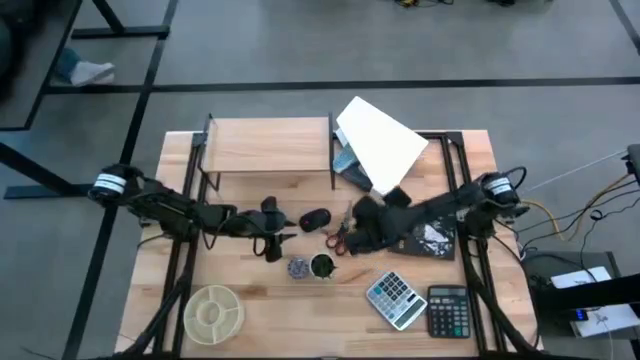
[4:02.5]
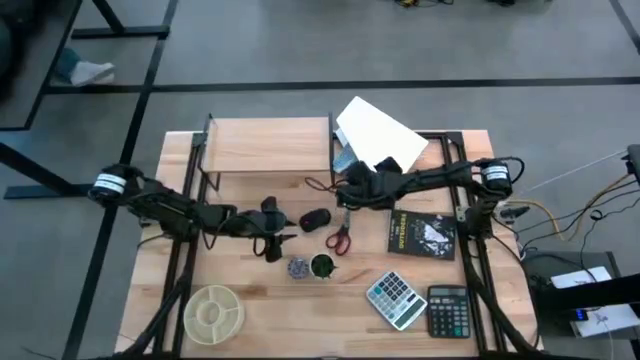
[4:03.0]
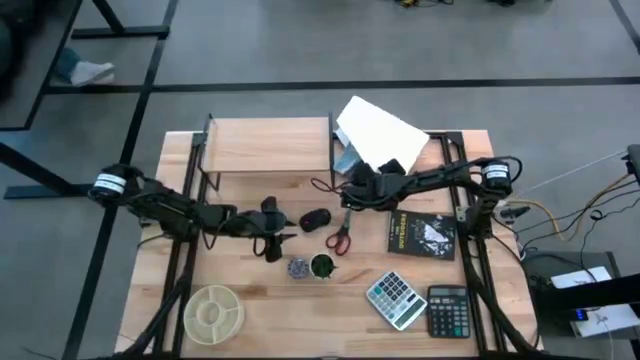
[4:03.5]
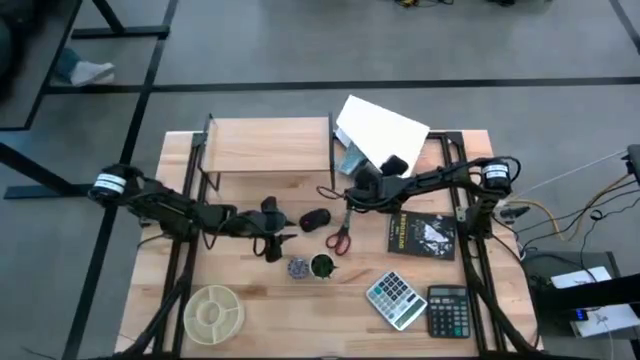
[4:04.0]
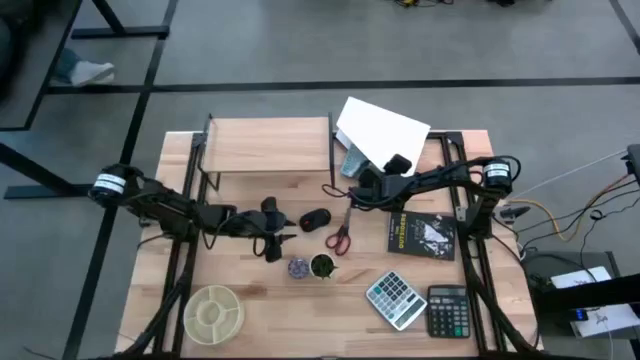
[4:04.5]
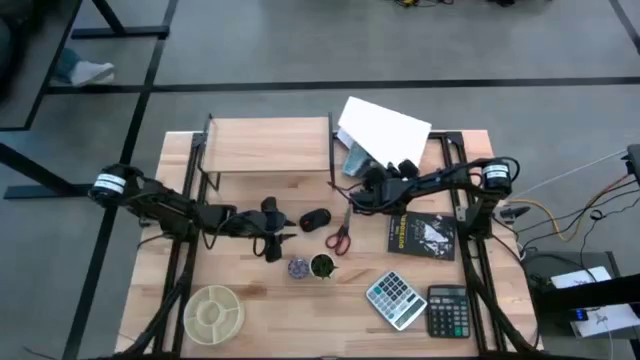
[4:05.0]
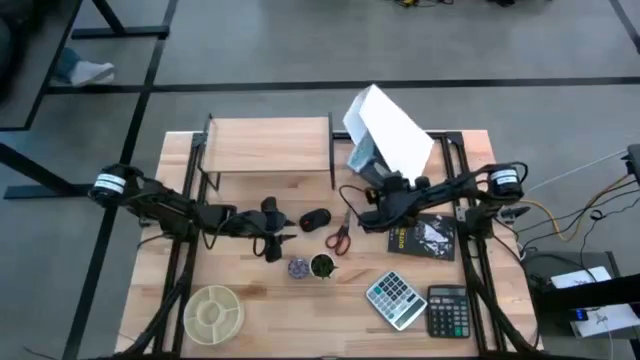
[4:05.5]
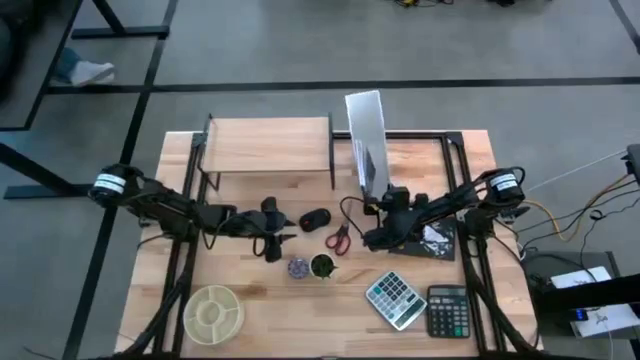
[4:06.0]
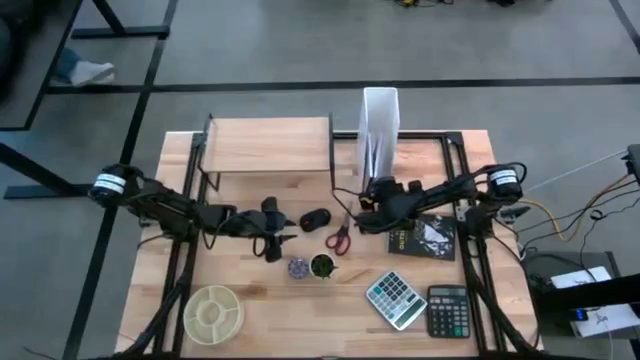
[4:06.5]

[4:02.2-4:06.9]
Task: Stock shelves
Adjust the white file holder

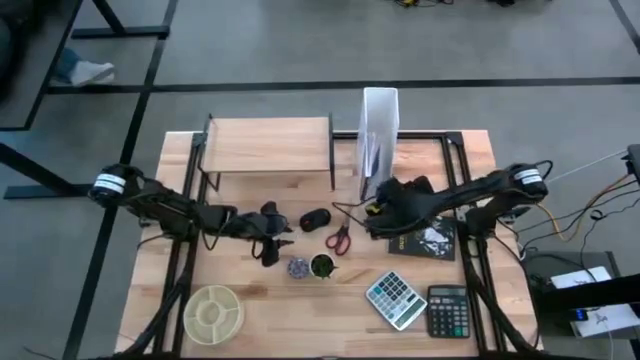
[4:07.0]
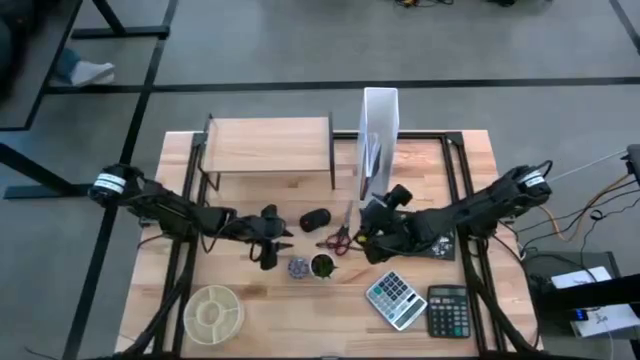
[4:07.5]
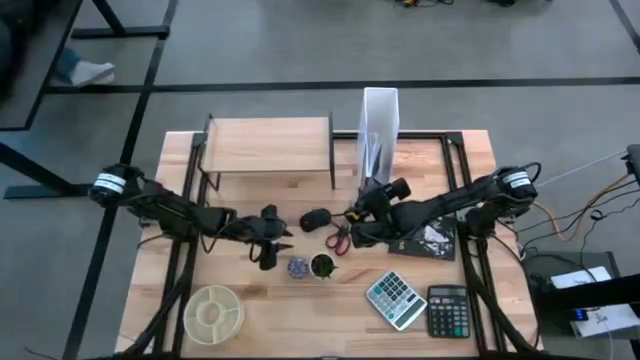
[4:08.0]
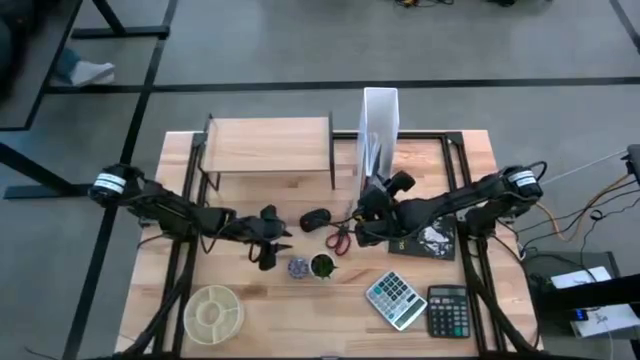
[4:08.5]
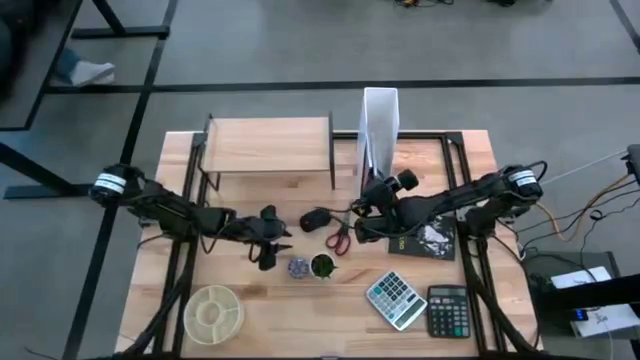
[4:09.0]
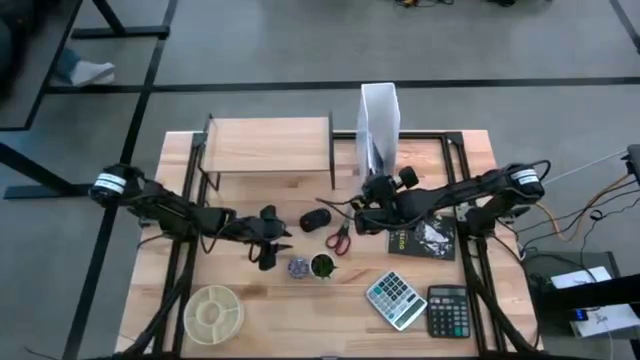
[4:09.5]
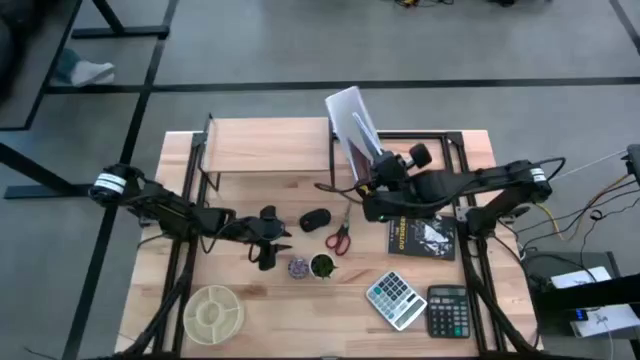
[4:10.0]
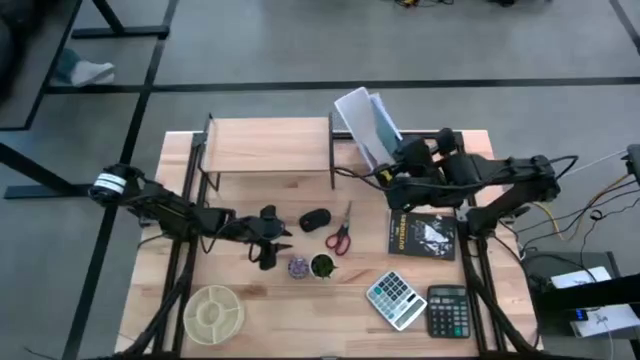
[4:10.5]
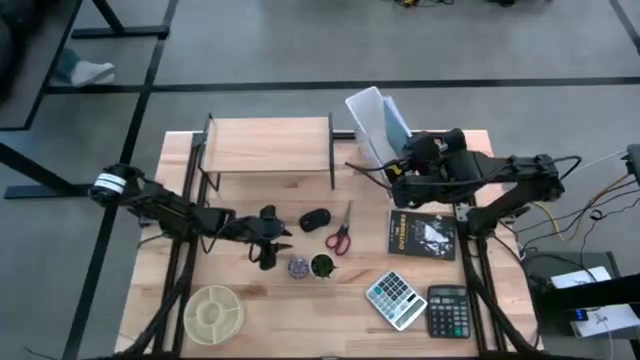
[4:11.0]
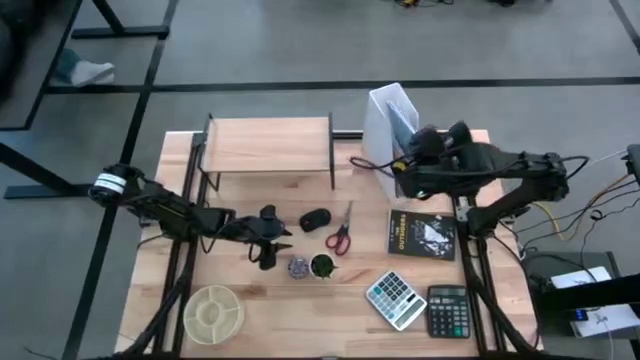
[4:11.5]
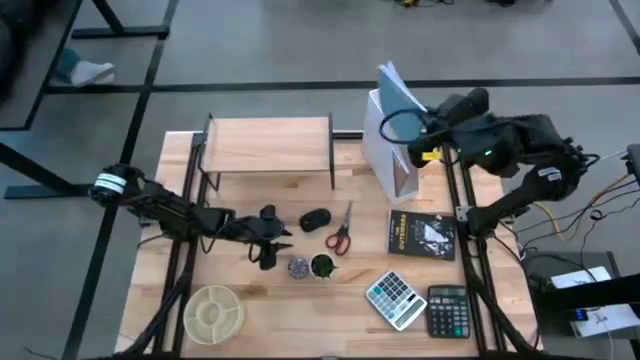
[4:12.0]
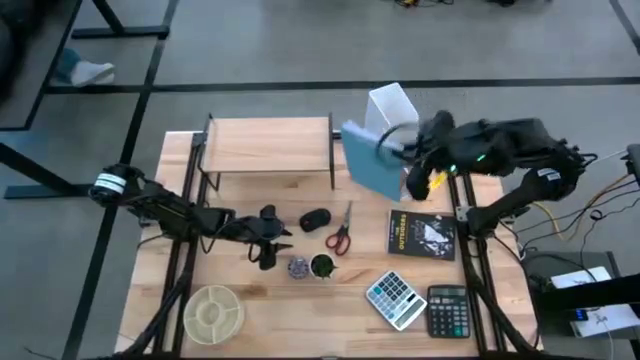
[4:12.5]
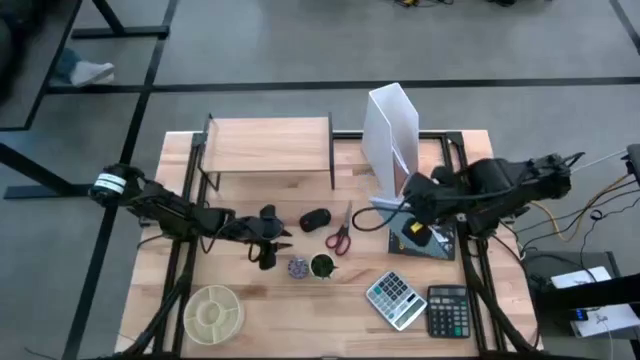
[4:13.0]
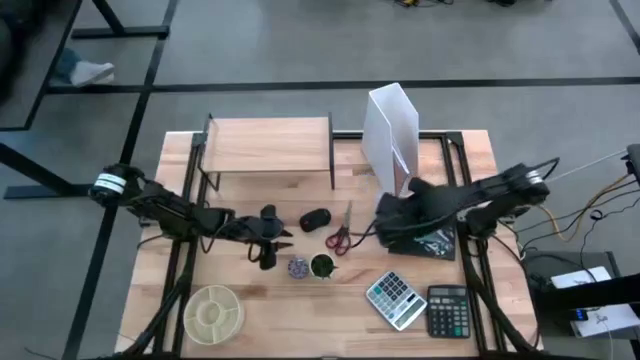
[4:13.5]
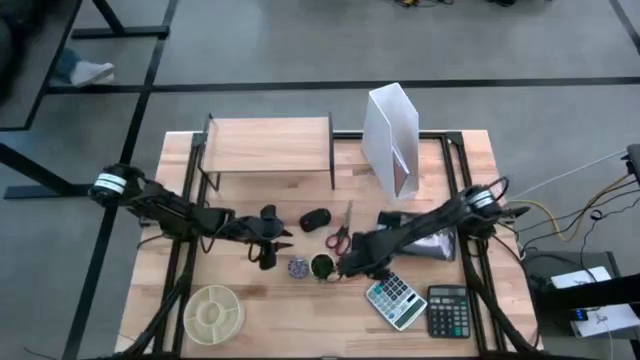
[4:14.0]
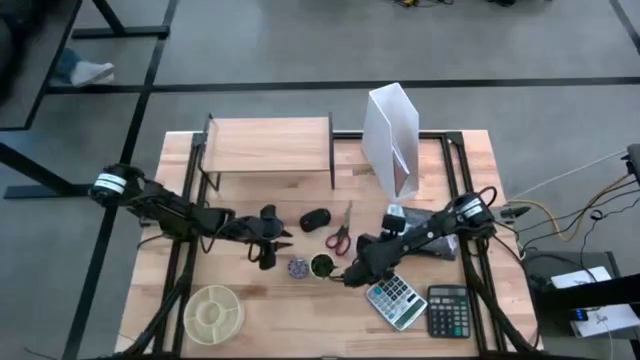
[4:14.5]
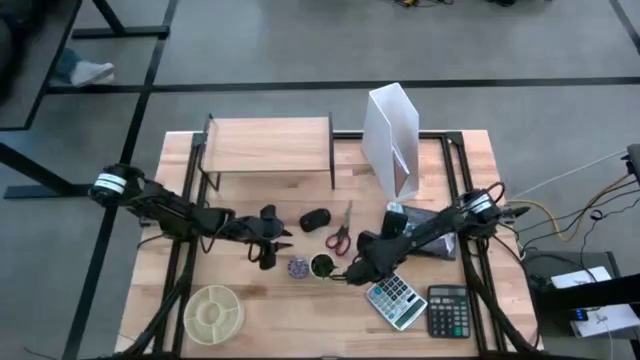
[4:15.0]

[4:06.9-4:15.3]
Remove the blue book from the white file holder

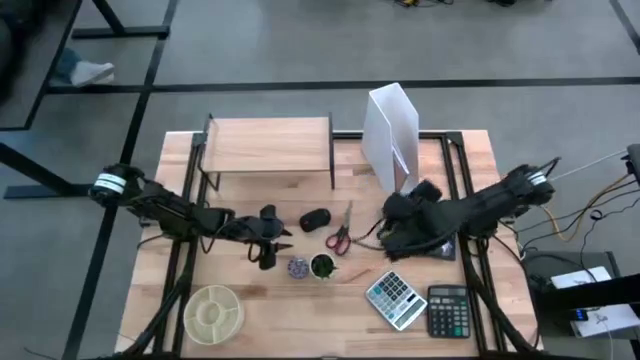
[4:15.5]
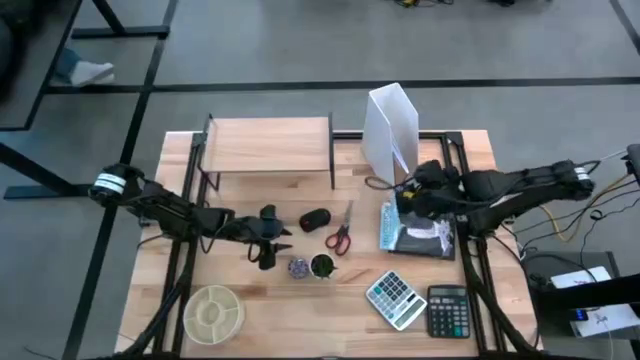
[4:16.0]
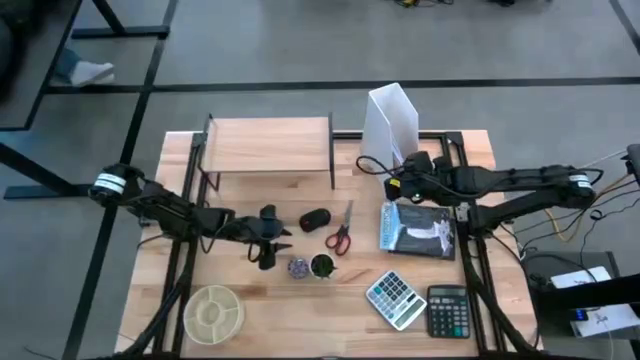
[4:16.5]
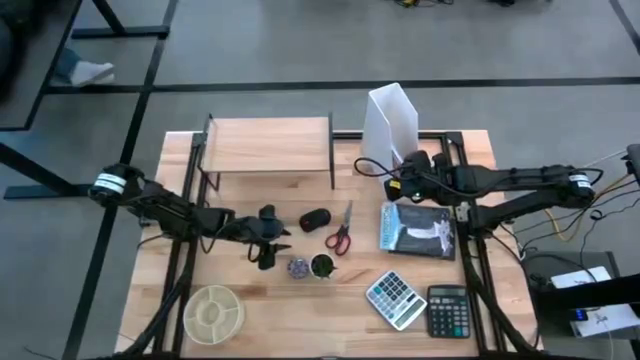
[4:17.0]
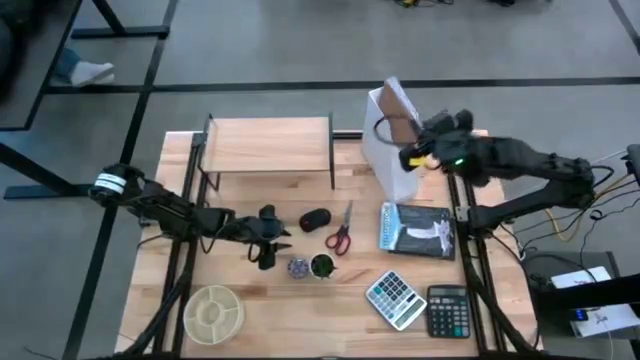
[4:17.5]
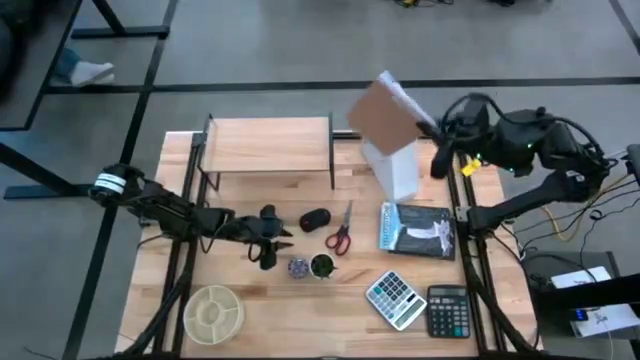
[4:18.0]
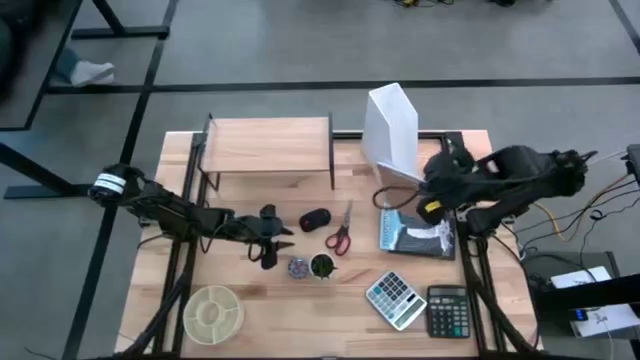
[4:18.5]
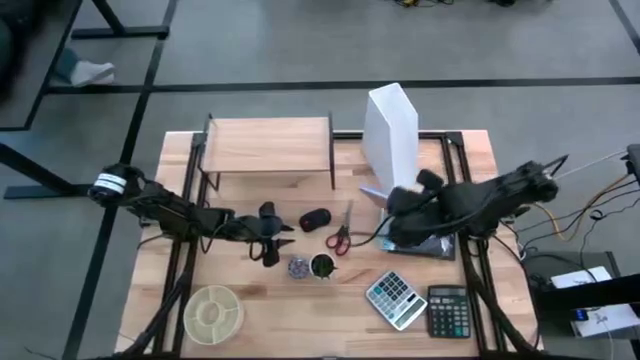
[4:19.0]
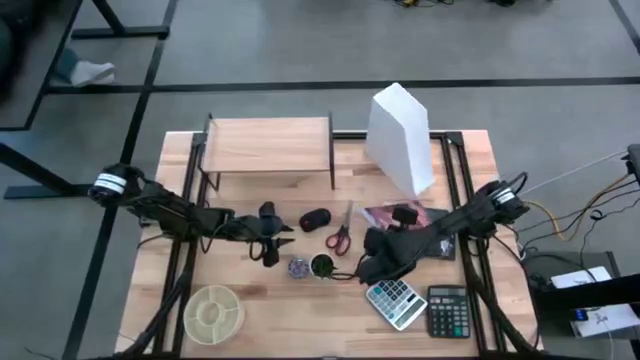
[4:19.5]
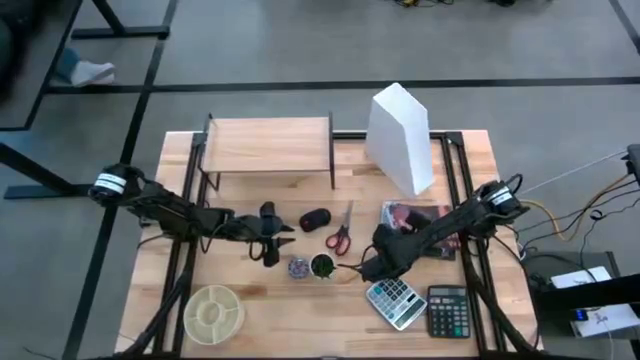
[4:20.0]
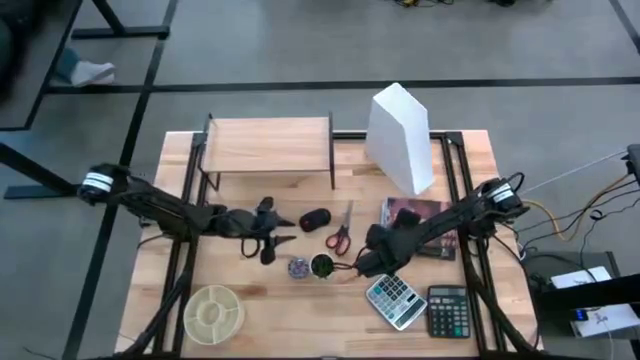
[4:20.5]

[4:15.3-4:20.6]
Remove the brown book from the white file holder

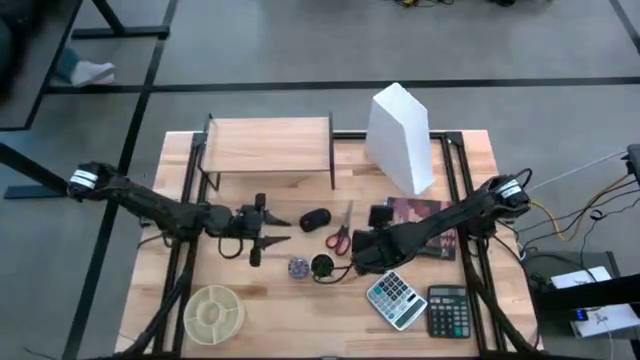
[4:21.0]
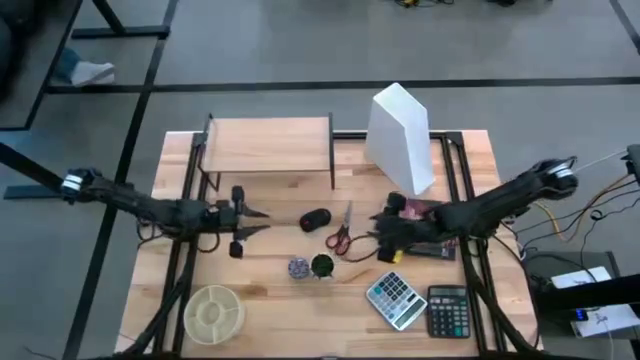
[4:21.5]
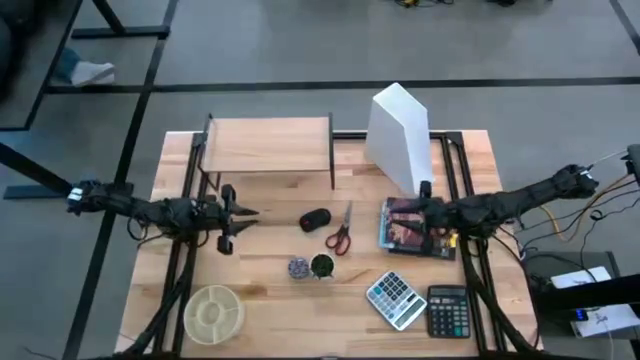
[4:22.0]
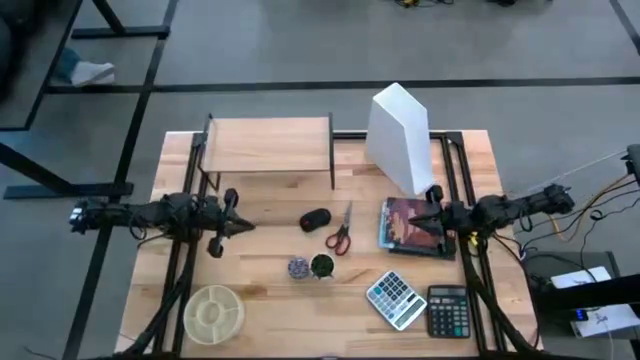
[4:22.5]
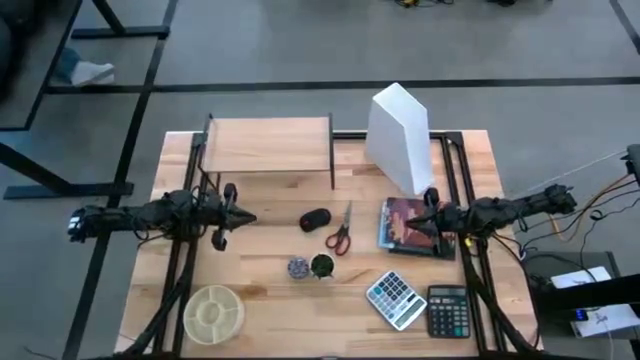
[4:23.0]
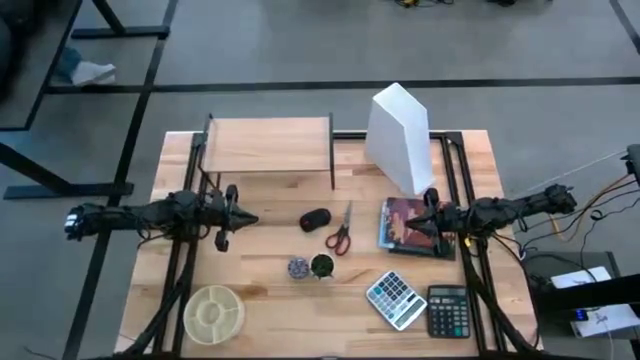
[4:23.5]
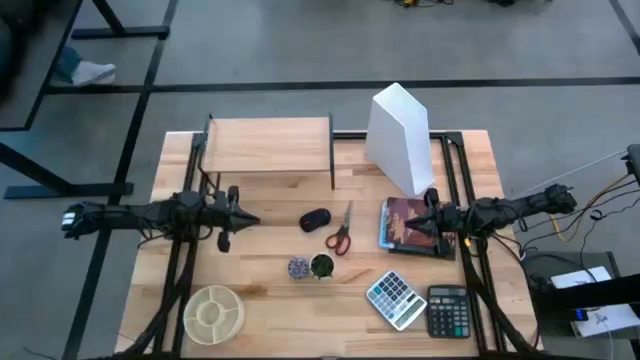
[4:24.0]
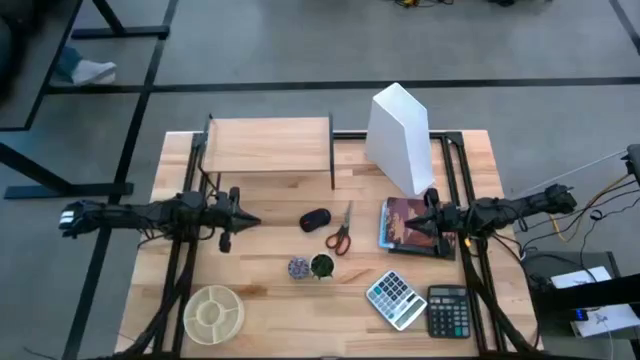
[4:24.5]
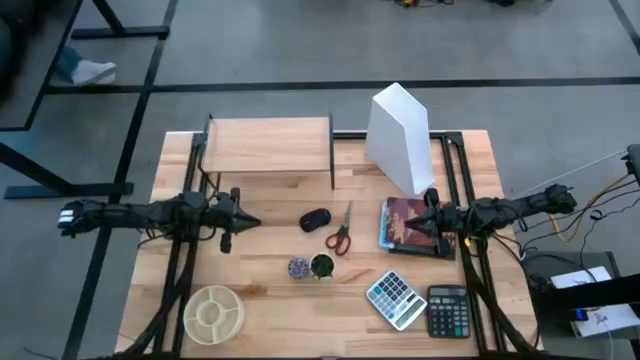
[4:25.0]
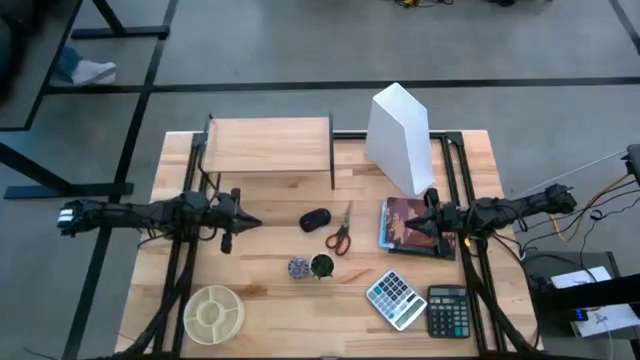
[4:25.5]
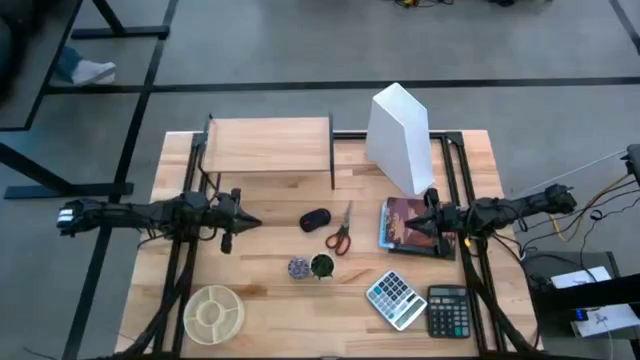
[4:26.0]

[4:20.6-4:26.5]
Return to Home Position
